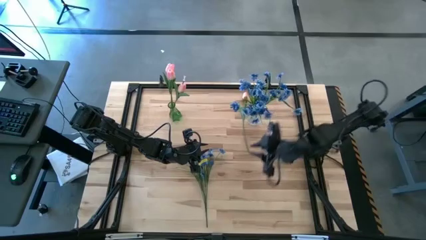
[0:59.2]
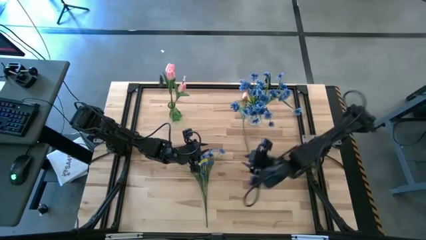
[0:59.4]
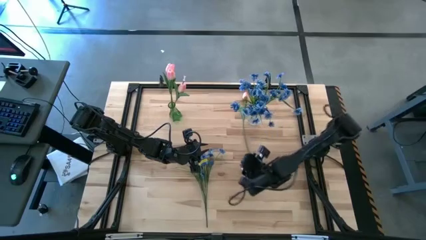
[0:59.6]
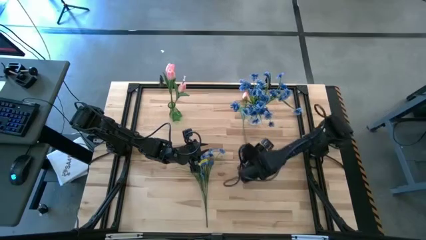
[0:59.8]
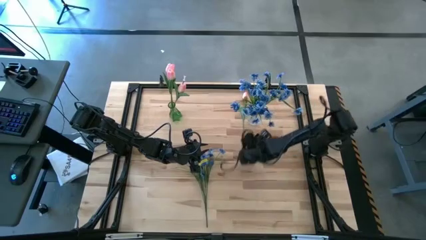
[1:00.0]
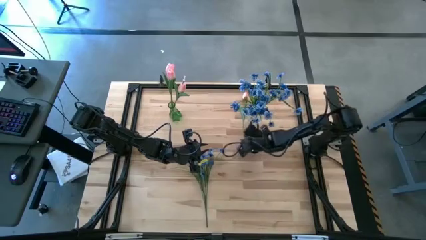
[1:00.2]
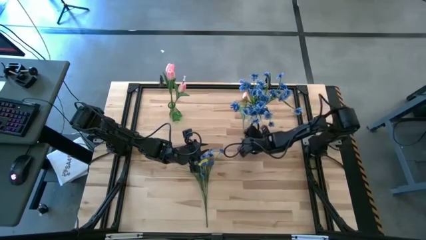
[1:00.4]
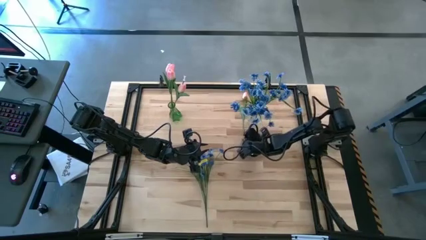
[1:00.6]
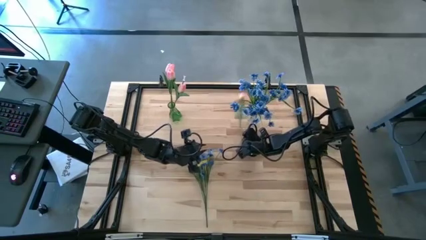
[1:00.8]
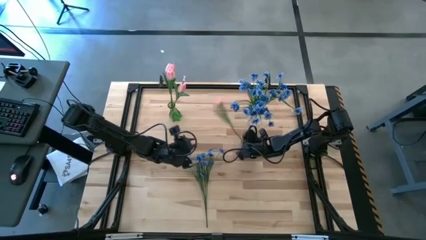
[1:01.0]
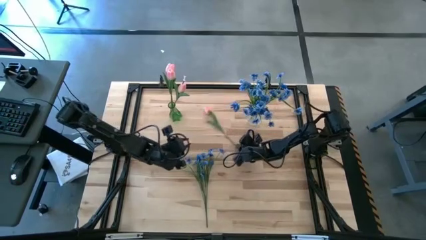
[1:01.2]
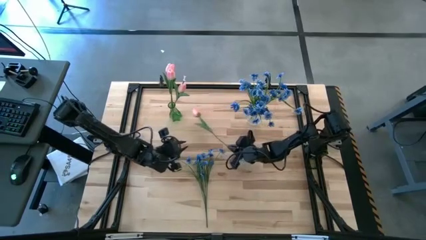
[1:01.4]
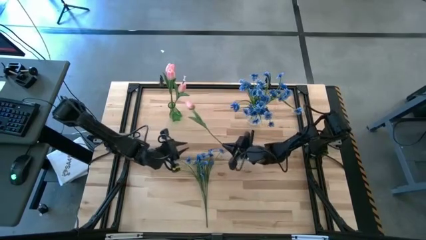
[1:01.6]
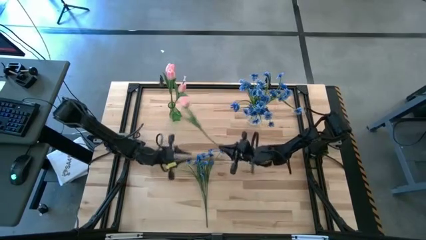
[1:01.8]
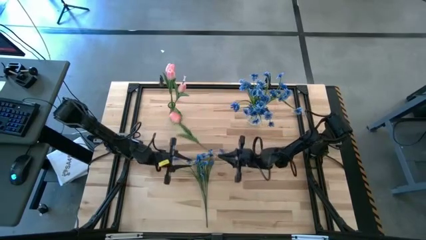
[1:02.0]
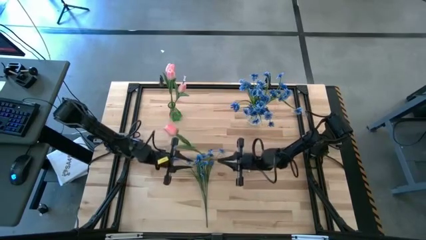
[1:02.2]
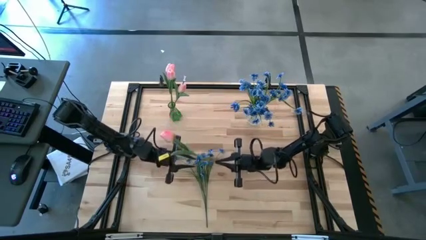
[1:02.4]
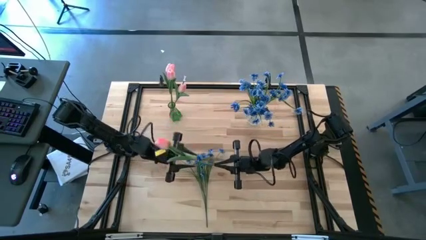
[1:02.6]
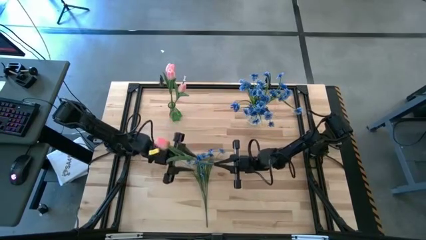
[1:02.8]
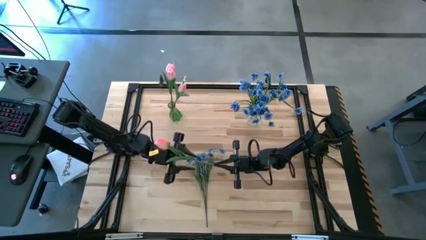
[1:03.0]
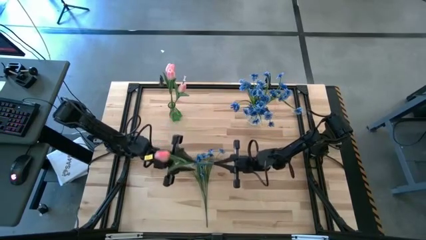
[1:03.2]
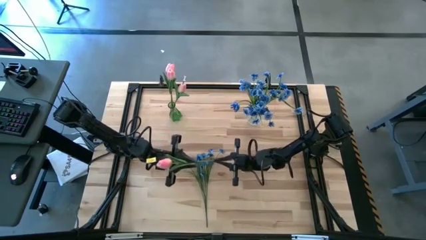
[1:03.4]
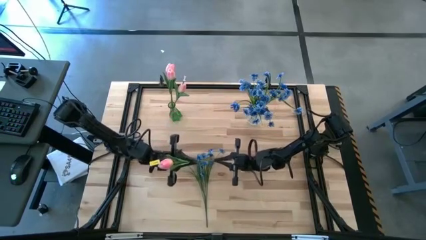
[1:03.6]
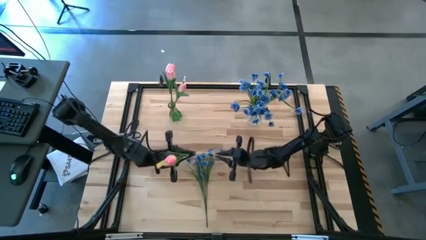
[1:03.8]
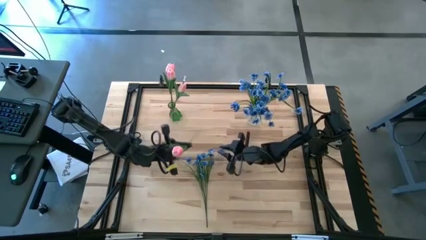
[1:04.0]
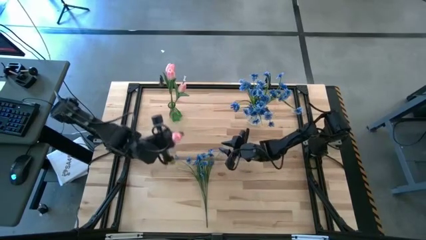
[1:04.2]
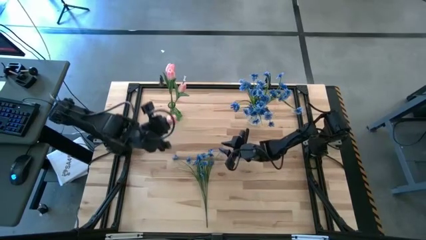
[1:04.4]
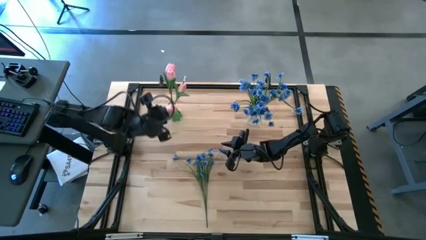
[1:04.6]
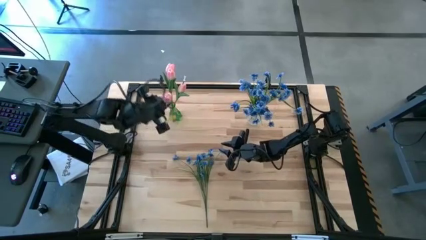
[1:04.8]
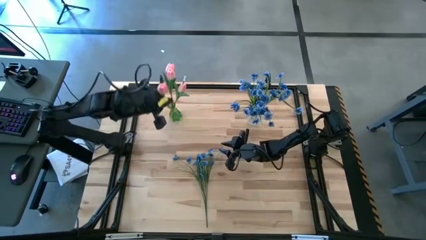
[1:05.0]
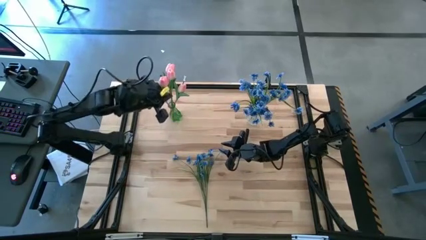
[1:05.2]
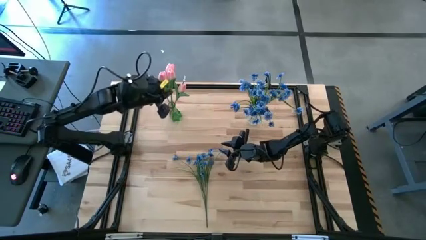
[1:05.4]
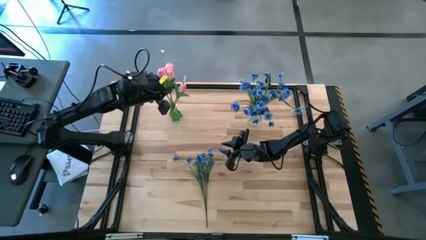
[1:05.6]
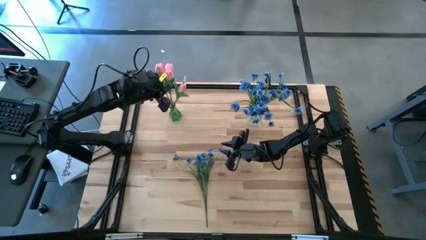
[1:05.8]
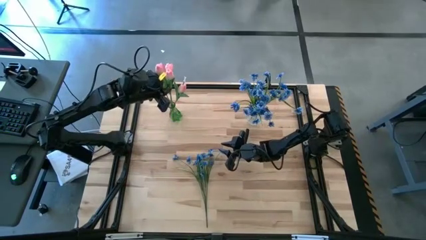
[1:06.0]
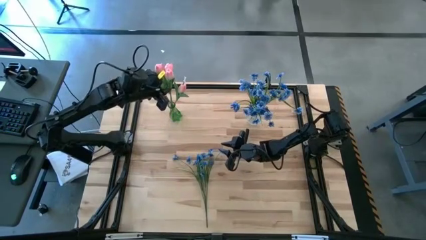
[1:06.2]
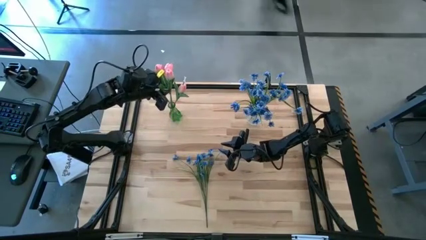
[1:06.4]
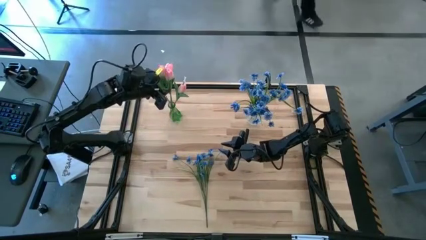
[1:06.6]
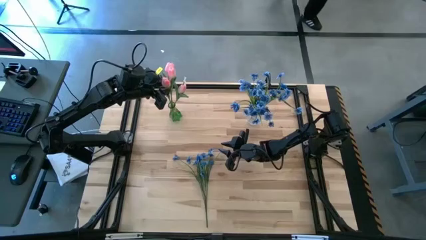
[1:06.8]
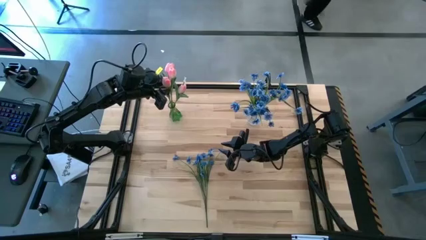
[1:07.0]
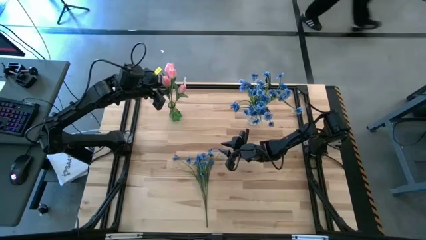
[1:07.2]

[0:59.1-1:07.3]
Task: Sort flowers into vase by color
Put the pink tulip into the green vase

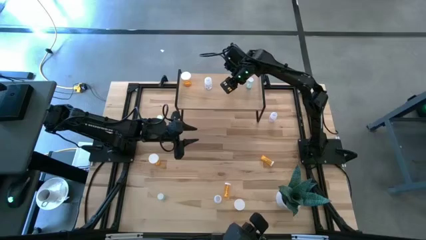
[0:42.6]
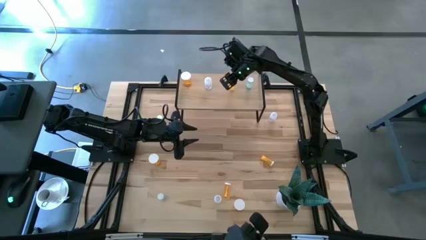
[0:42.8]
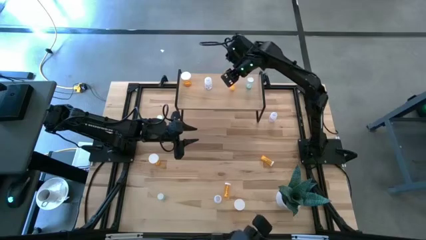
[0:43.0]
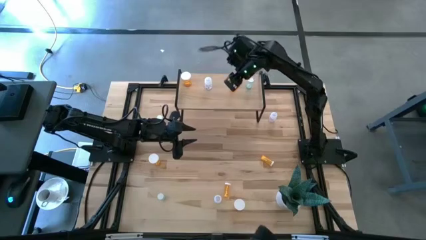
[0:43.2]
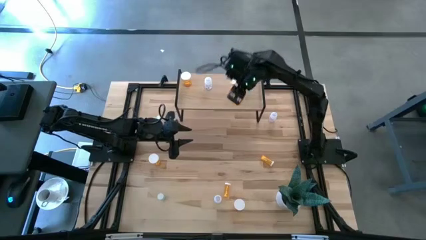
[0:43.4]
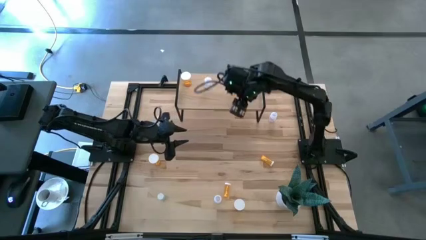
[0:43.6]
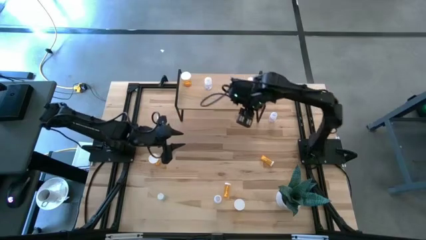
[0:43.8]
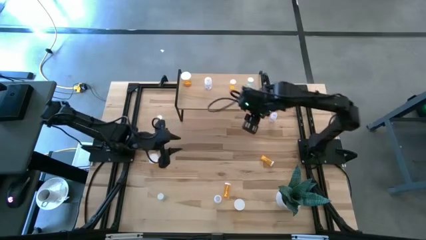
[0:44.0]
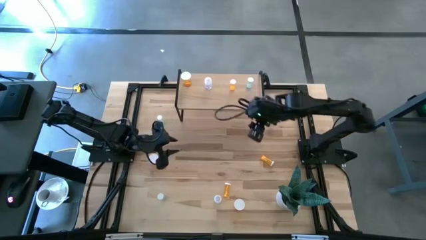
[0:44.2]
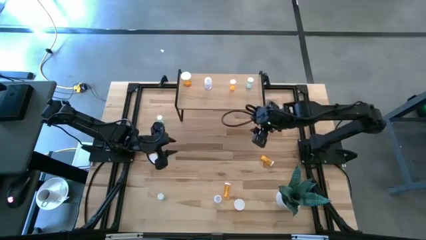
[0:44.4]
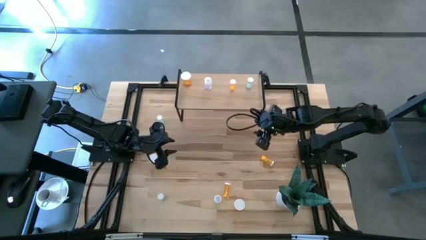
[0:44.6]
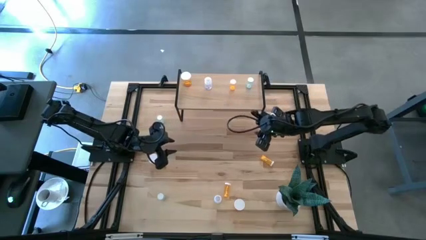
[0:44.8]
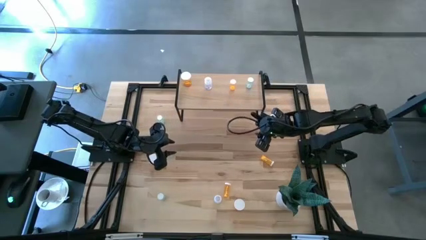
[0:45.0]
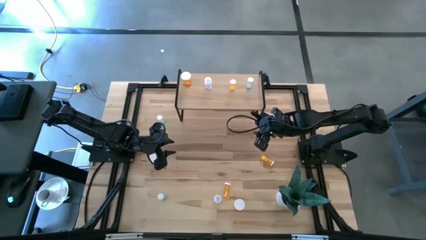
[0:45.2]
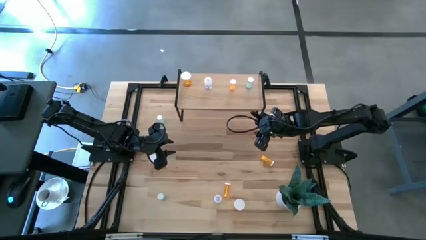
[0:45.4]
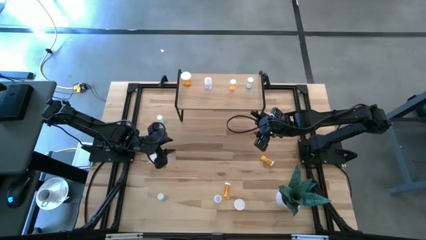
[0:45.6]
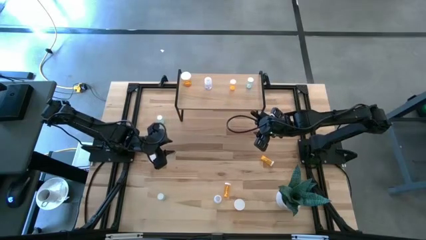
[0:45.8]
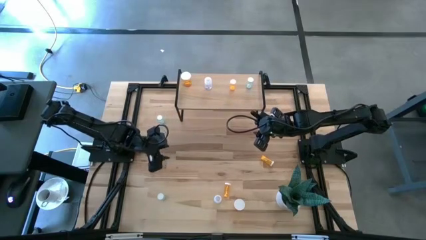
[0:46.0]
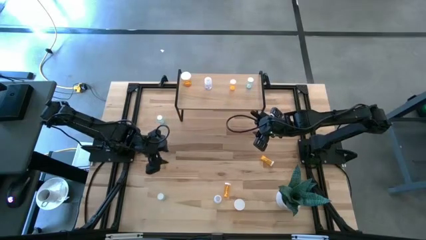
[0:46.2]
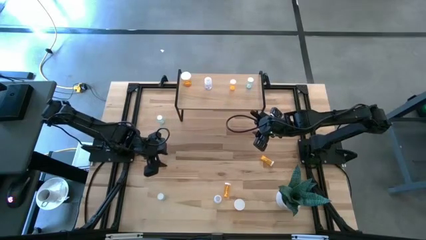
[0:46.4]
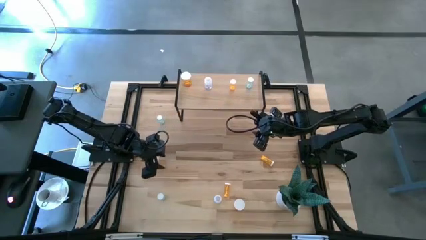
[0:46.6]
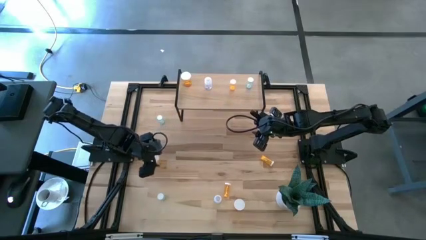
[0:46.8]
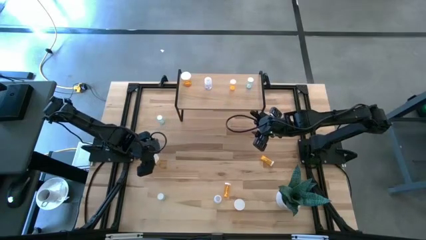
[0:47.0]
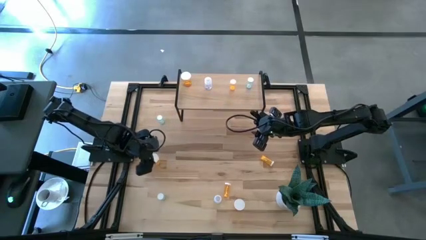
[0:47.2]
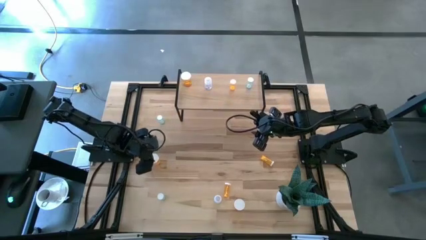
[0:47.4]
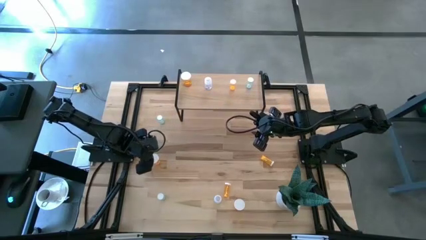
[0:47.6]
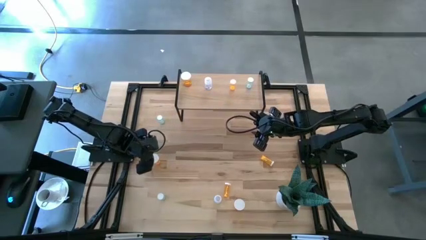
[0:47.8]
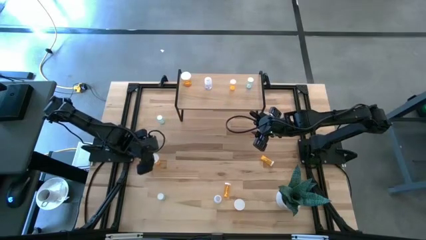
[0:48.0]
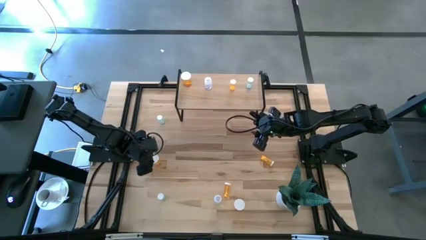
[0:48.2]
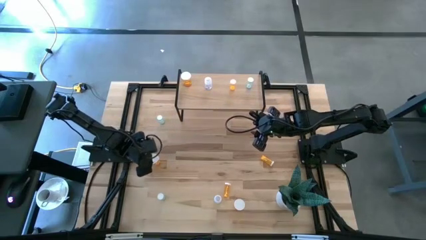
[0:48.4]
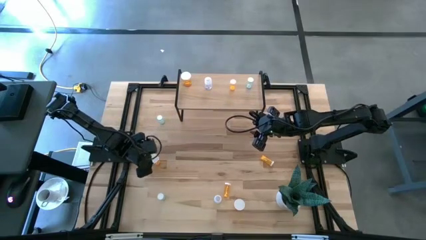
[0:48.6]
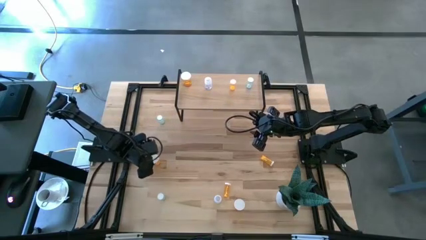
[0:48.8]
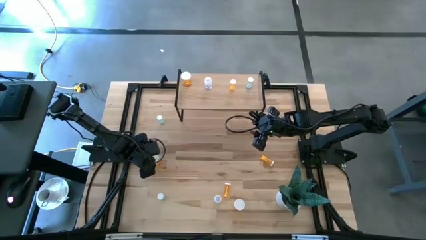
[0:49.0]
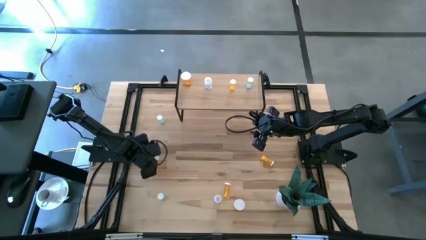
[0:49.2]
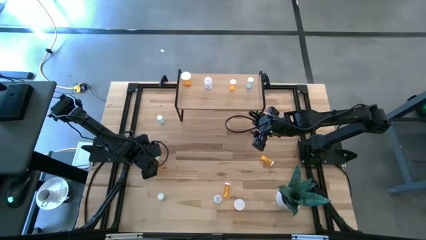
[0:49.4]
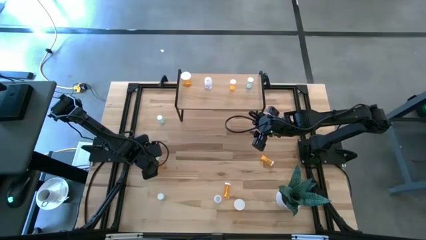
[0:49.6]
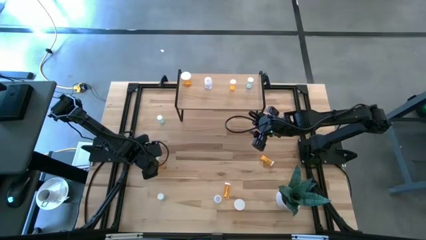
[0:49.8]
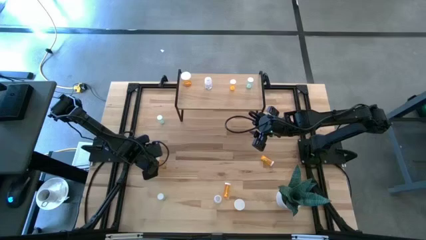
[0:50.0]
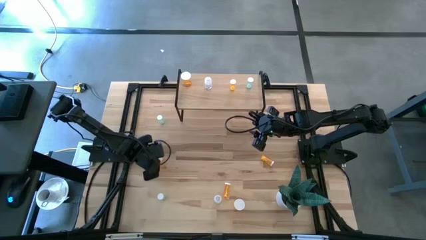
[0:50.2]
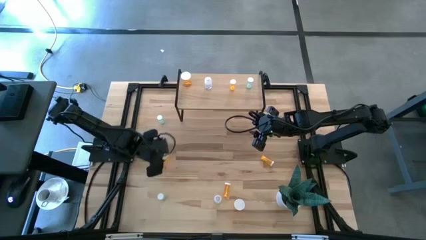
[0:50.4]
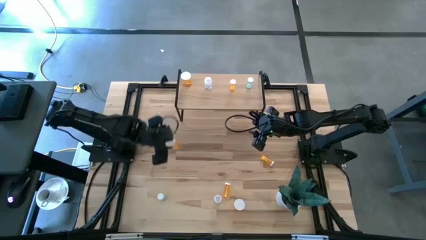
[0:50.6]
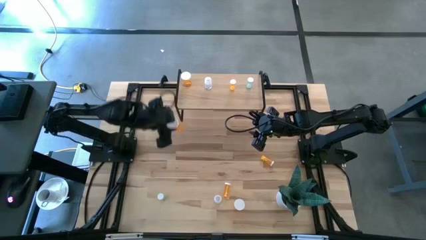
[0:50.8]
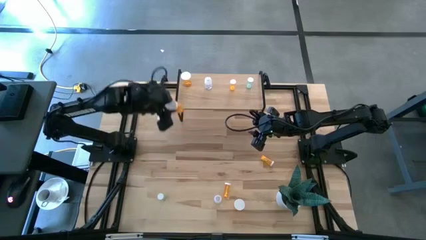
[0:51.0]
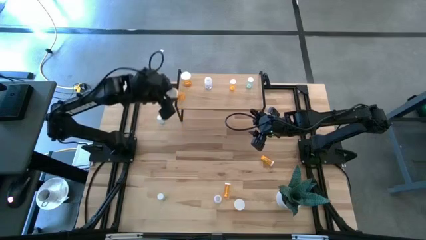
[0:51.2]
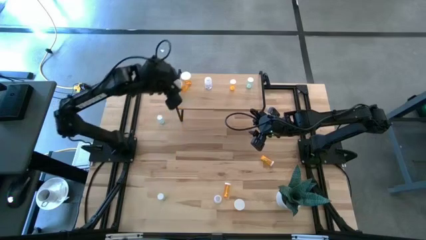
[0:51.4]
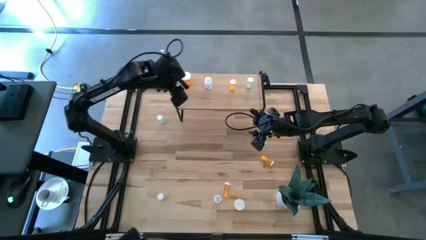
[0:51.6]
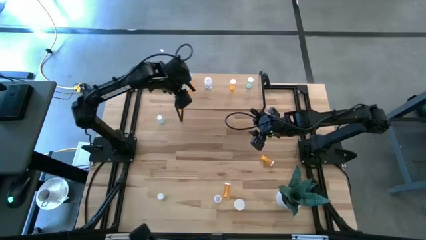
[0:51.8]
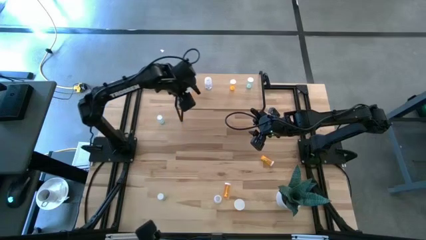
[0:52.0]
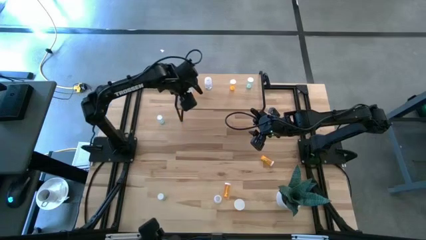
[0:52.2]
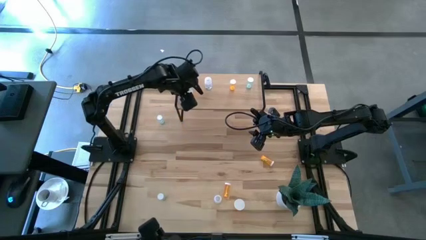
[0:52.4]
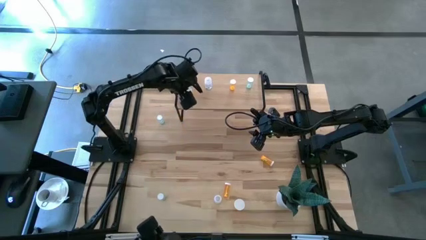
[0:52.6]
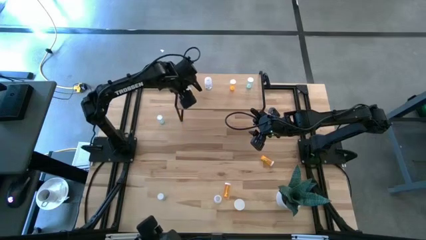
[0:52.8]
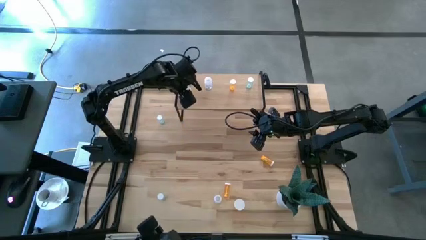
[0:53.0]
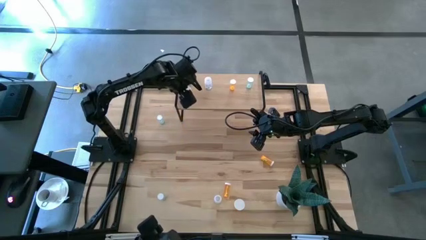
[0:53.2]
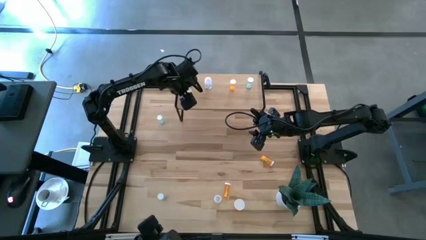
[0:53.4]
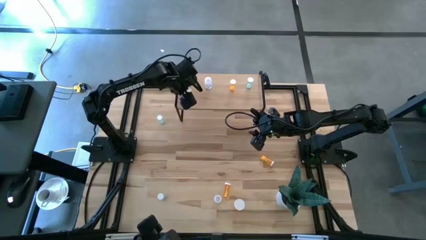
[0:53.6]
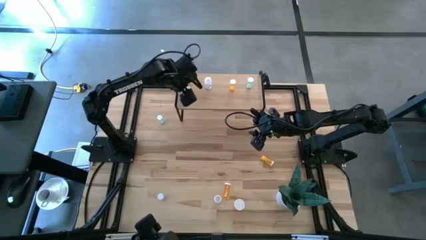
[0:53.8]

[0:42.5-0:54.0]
Task: Pick and place medicine bottles onto shelf by color
Put the left large orange pill bottle on the shelf aligned with the other large orange pill bottle
